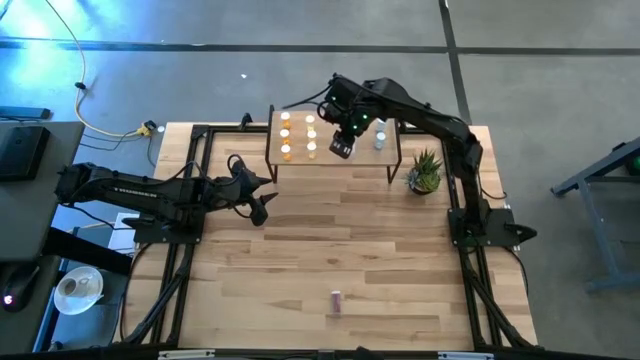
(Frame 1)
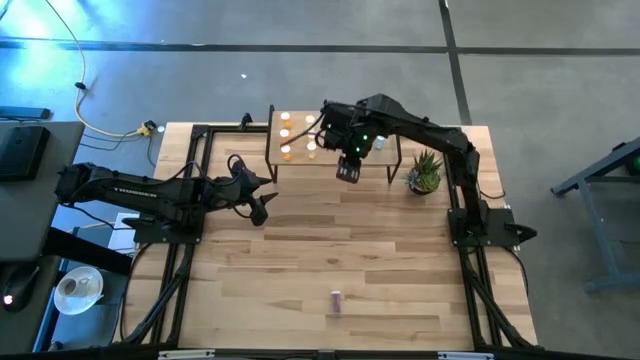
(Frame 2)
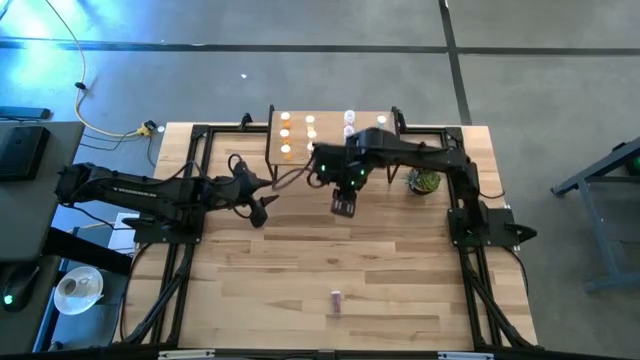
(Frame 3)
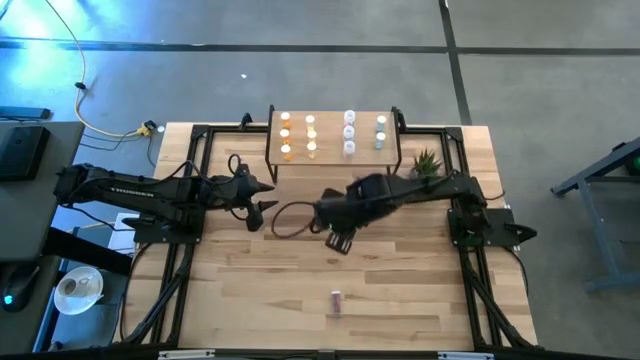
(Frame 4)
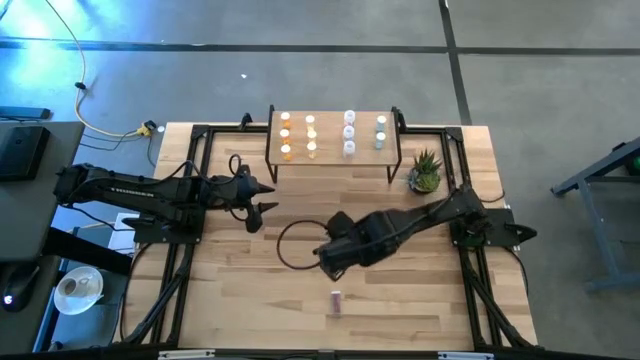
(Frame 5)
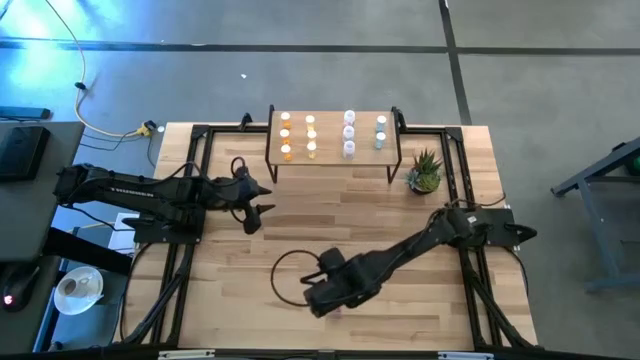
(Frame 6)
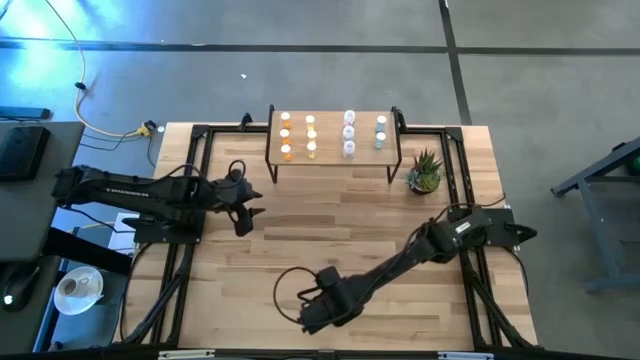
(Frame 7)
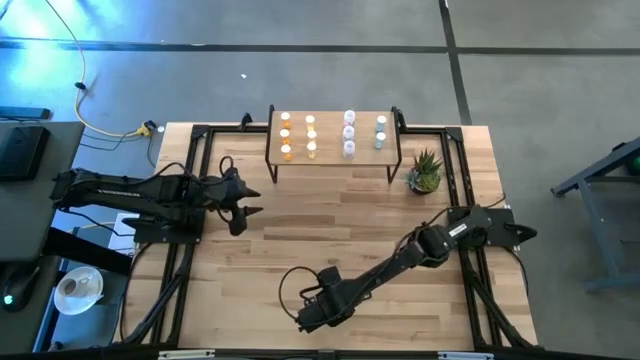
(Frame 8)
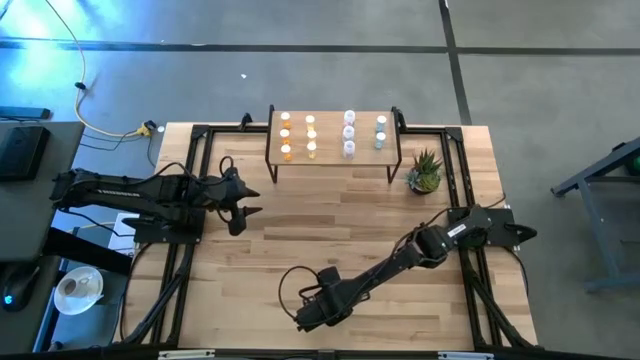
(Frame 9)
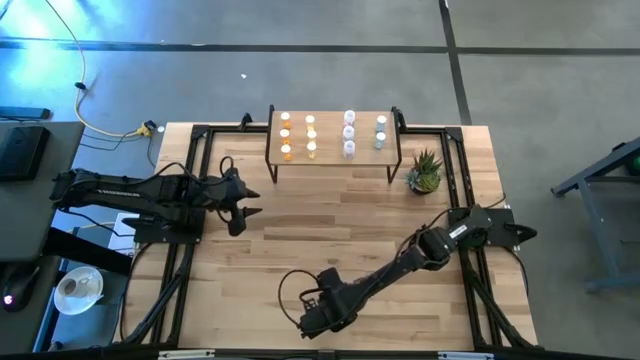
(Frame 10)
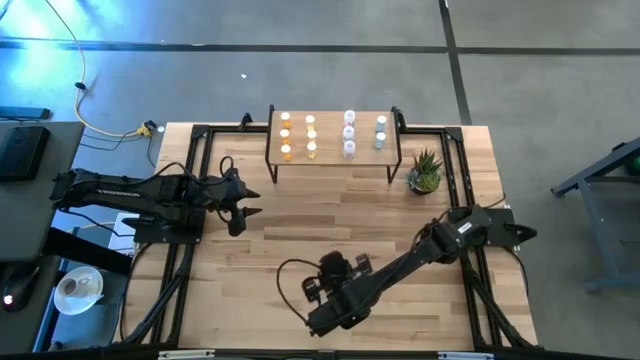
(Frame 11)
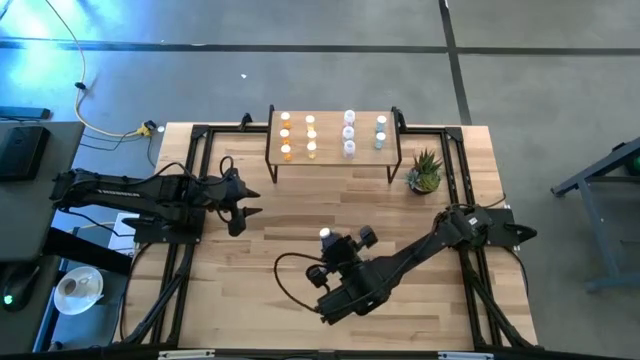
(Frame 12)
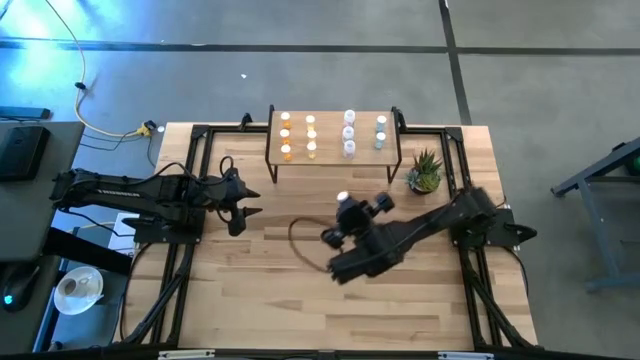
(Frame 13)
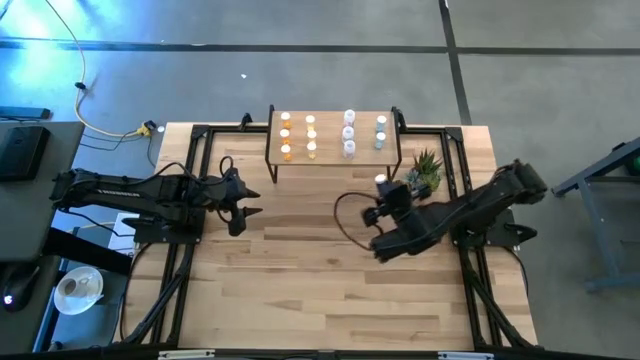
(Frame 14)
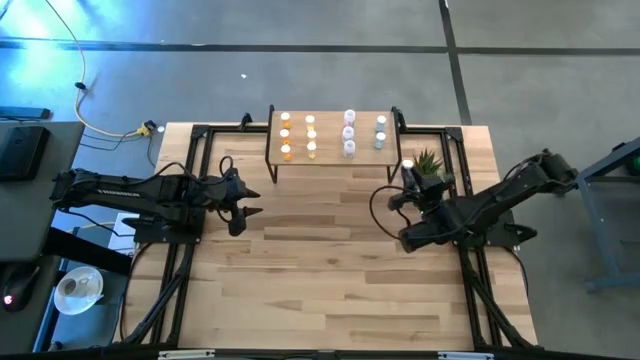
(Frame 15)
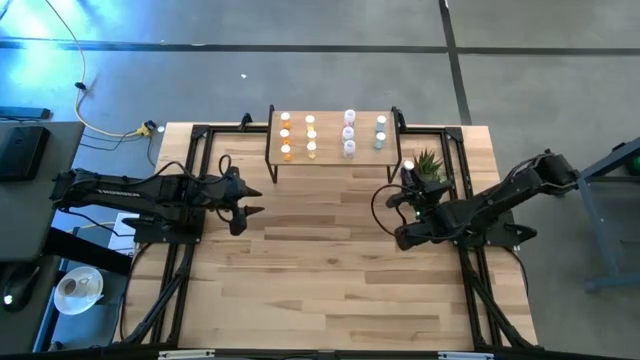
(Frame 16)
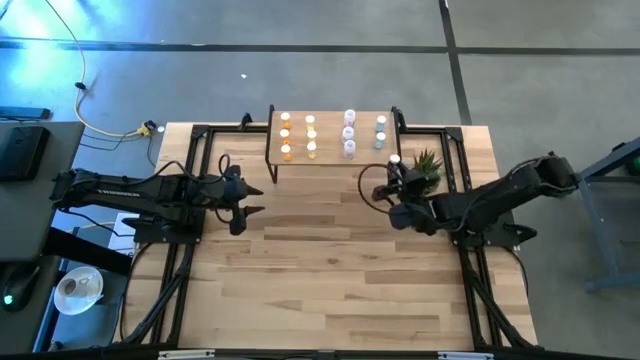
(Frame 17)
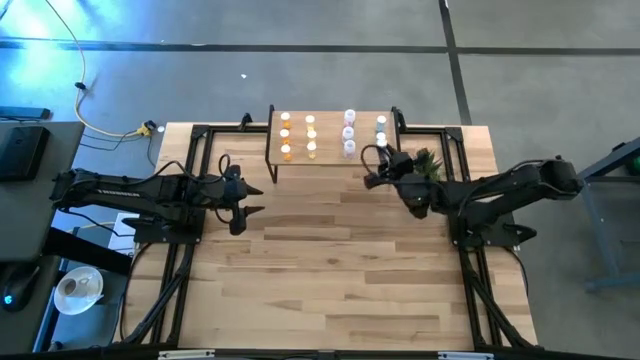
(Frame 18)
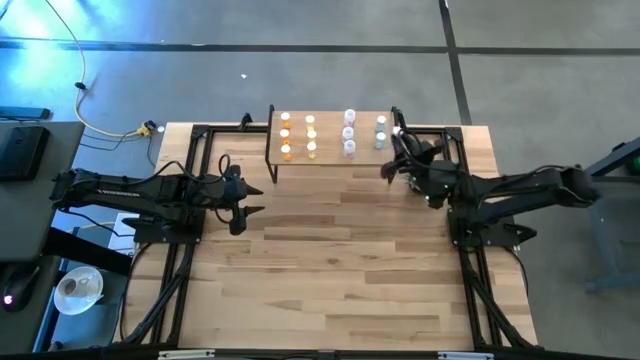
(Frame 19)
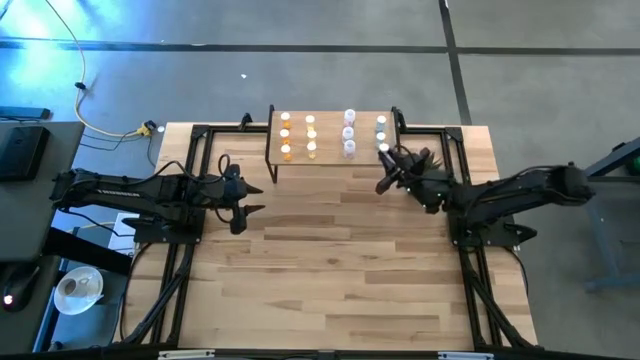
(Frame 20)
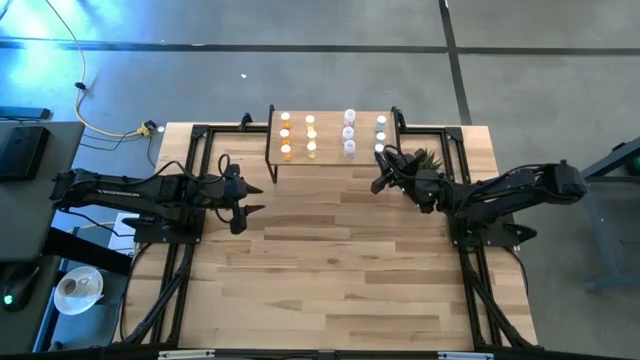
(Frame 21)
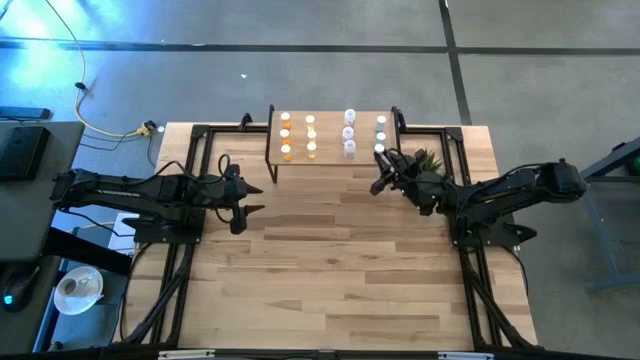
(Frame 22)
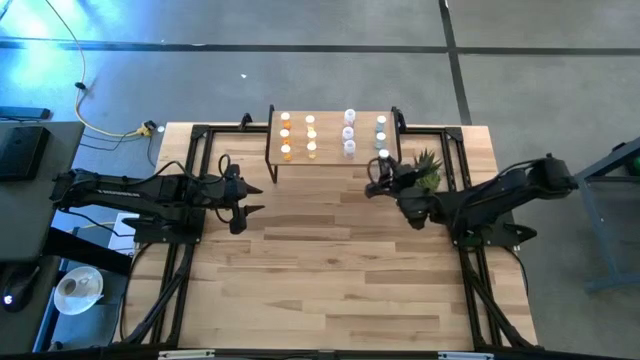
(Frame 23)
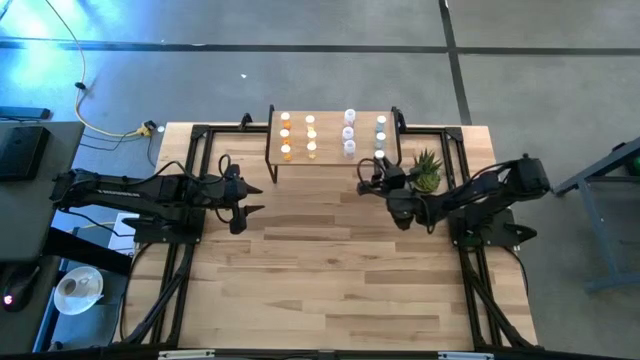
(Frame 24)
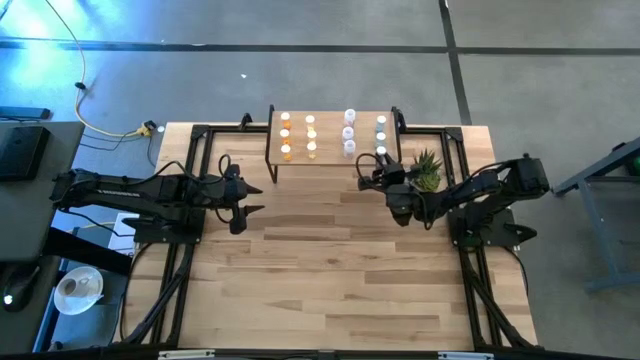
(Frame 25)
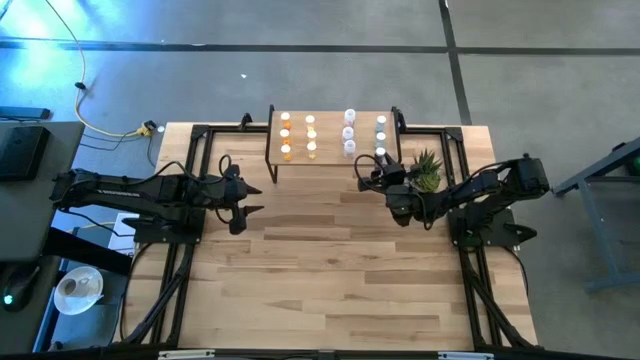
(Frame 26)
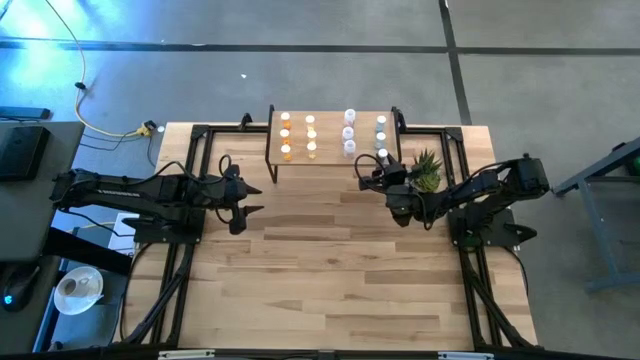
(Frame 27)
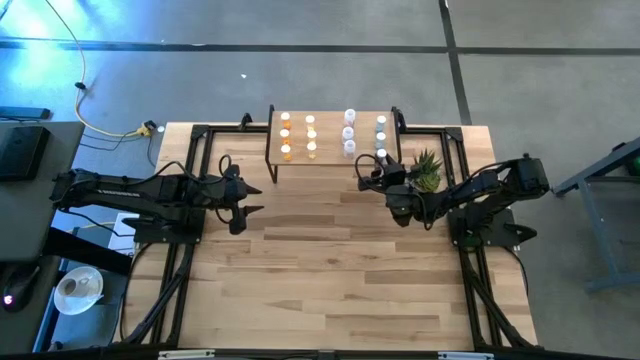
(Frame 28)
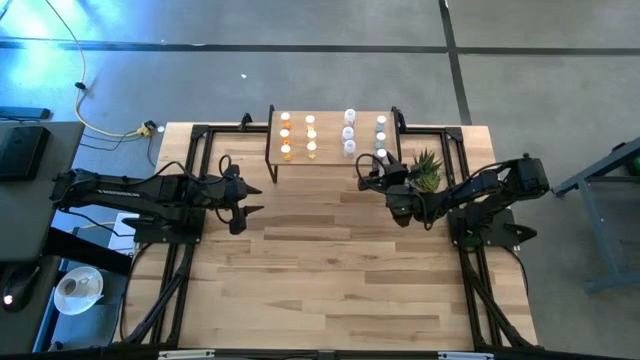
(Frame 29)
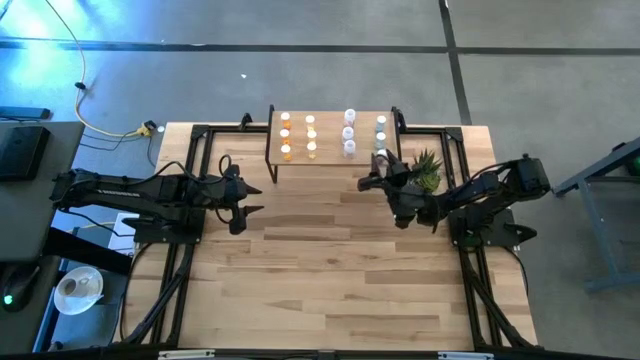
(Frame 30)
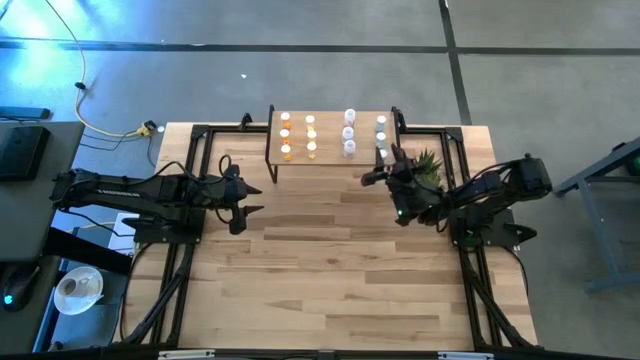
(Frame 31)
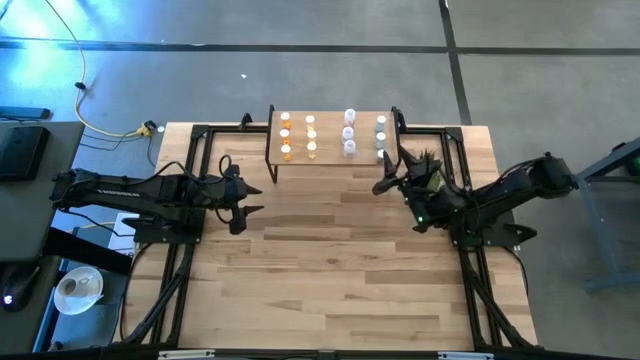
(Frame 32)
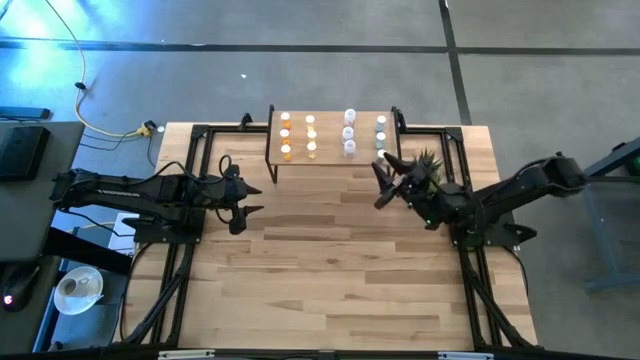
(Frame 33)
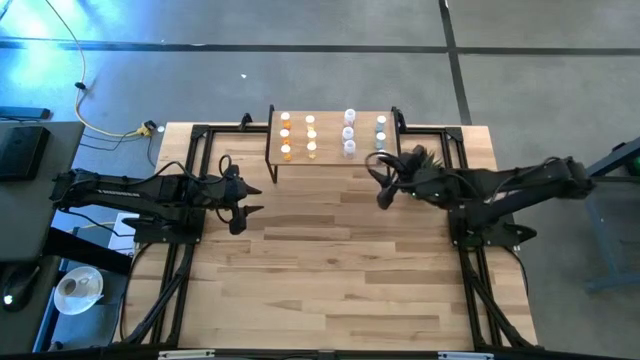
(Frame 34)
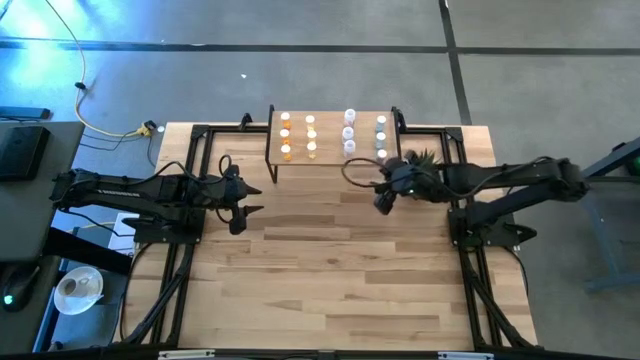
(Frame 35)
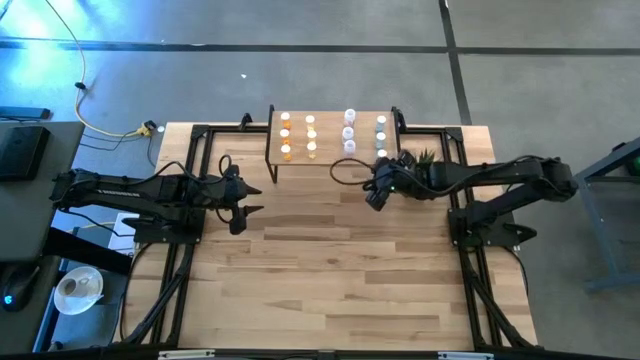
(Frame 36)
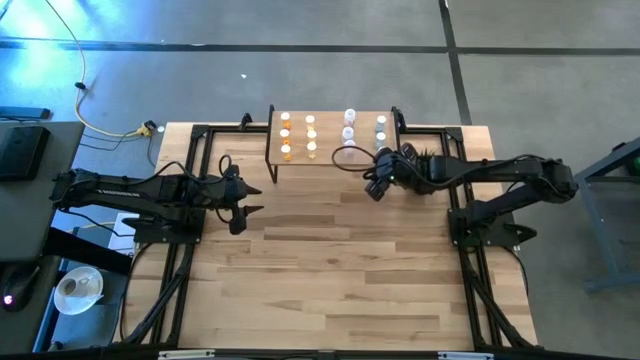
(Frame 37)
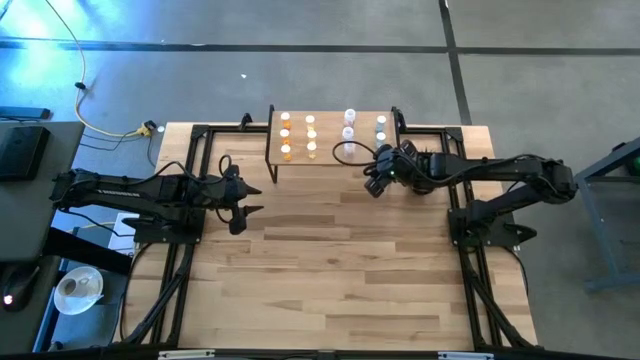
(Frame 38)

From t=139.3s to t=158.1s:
Task: Pick and place medicine bottles onto shelf by color
Put the blue pill bottle on the shelf aligned with the other blue pill bottles

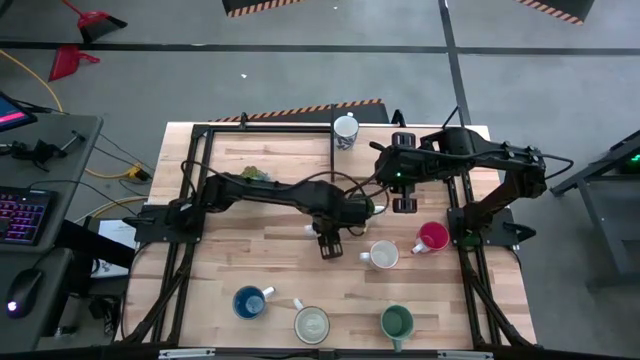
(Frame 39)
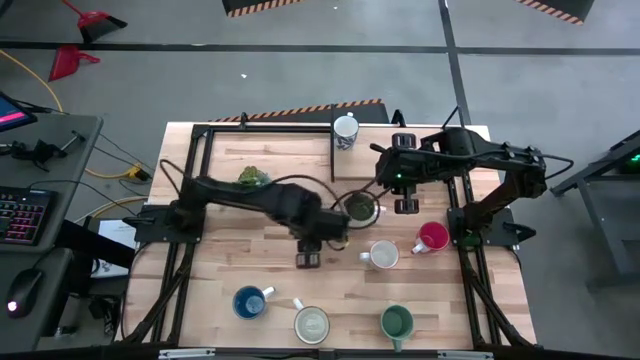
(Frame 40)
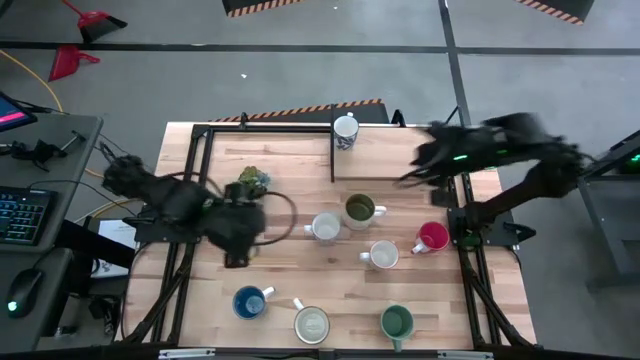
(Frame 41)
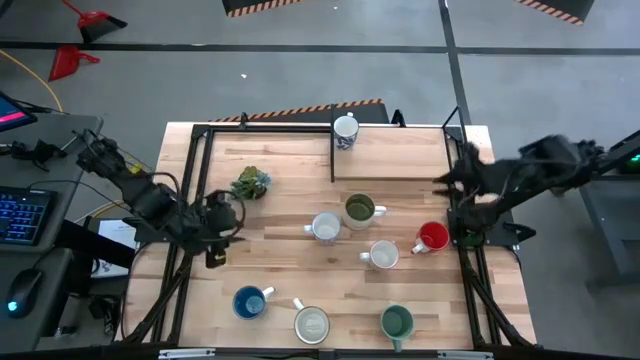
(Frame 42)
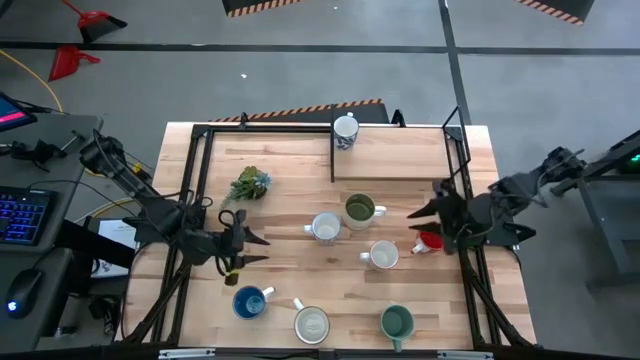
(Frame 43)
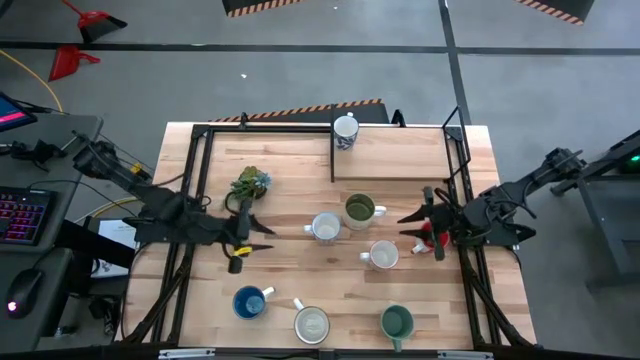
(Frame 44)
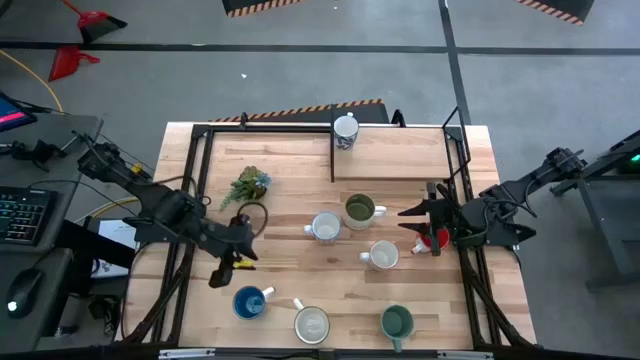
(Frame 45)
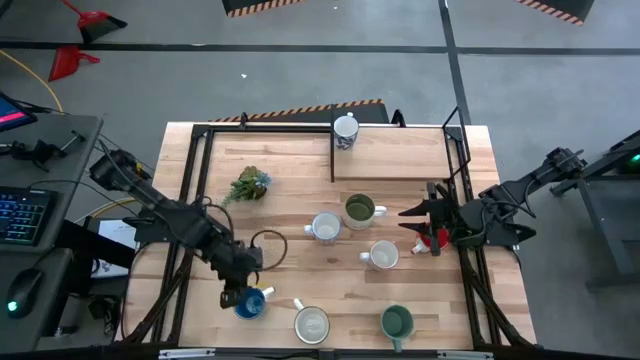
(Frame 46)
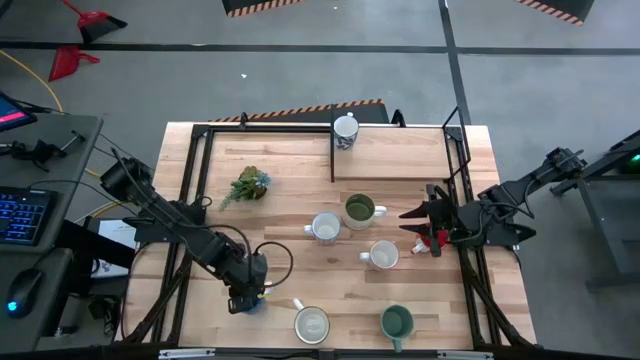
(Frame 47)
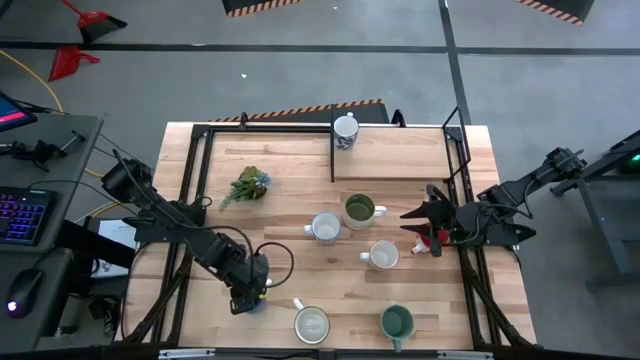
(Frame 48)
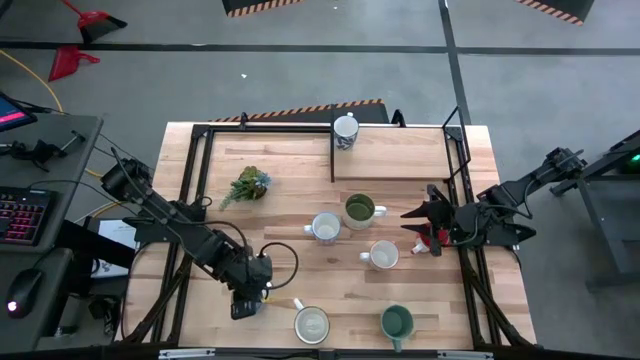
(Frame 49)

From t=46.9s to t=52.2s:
Task: Place coffee mugs
Move the blue mug to the center of the table
